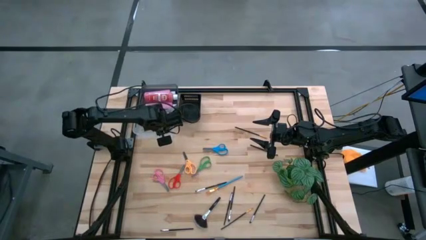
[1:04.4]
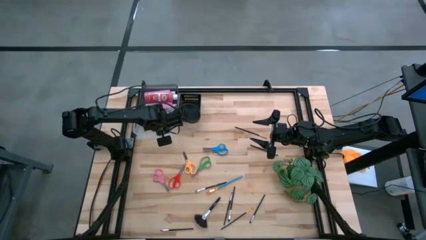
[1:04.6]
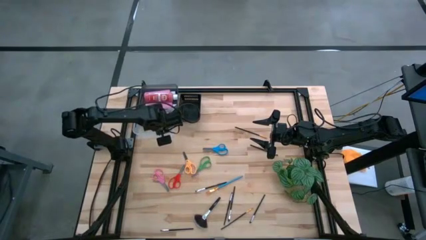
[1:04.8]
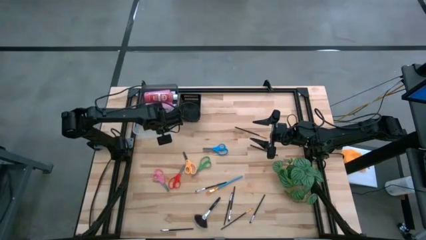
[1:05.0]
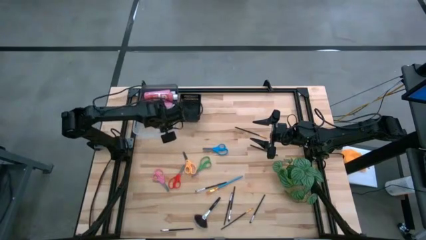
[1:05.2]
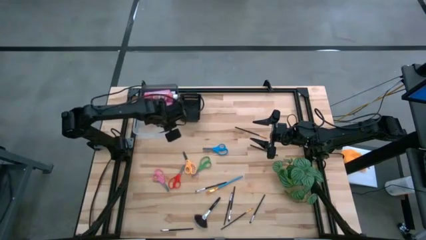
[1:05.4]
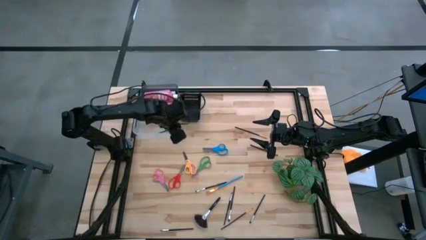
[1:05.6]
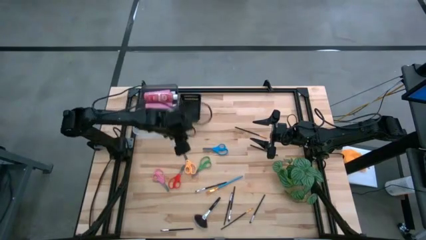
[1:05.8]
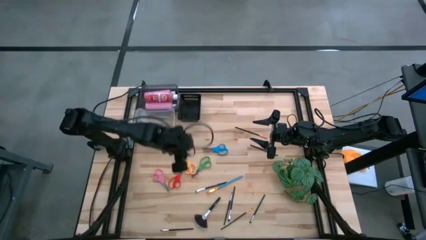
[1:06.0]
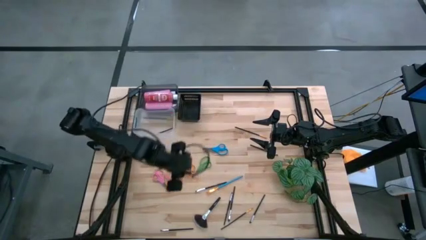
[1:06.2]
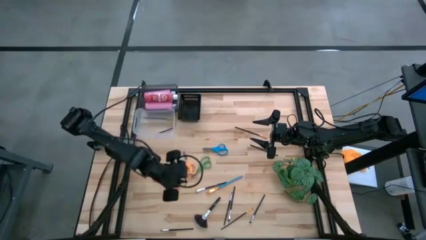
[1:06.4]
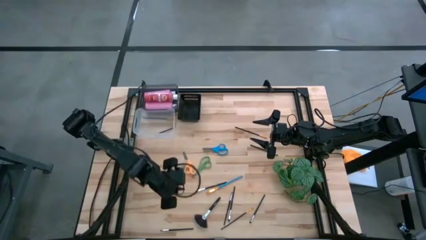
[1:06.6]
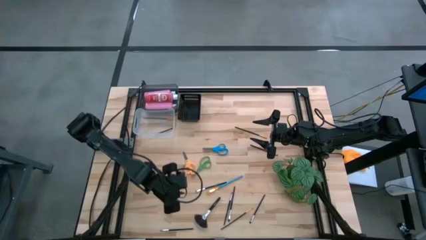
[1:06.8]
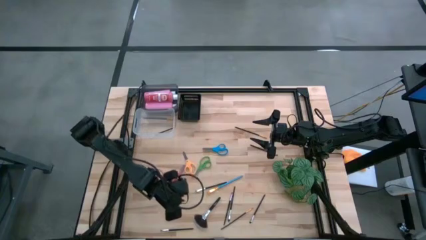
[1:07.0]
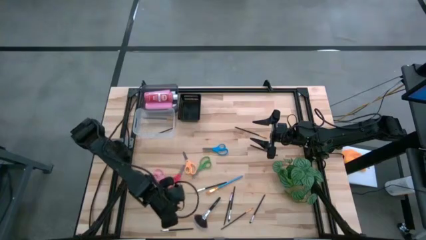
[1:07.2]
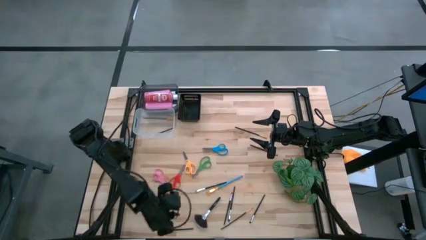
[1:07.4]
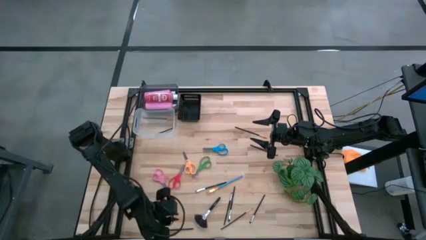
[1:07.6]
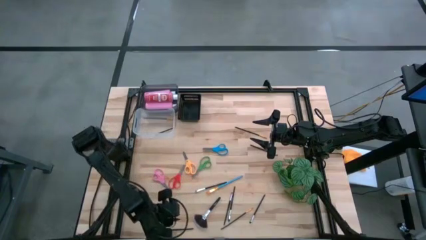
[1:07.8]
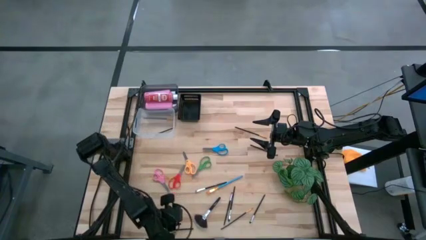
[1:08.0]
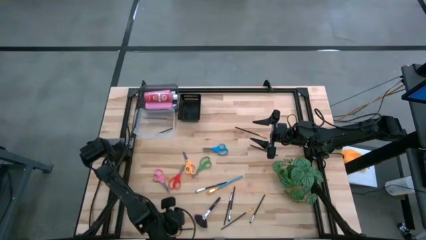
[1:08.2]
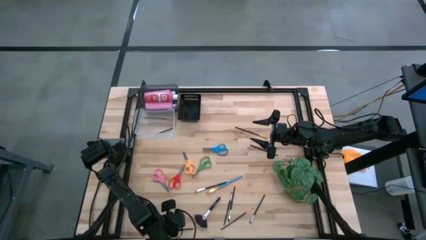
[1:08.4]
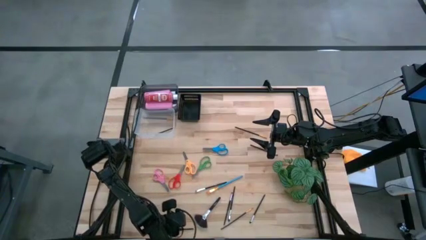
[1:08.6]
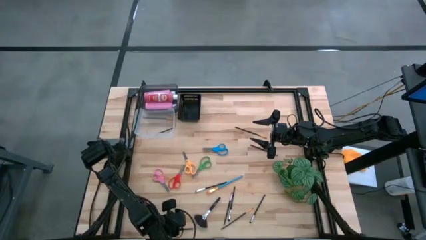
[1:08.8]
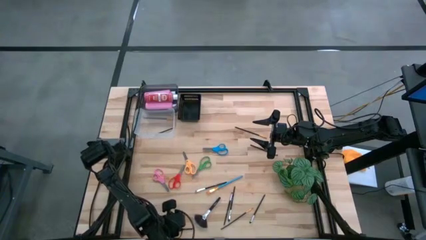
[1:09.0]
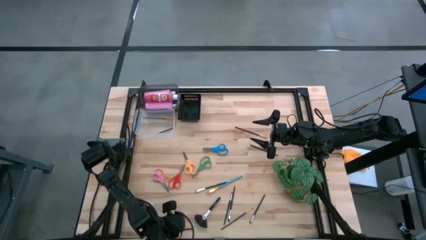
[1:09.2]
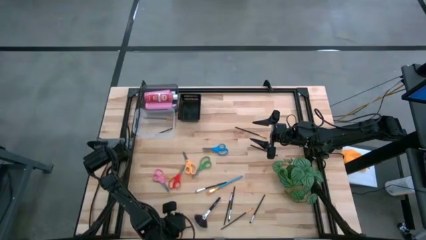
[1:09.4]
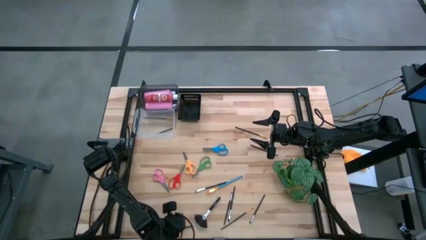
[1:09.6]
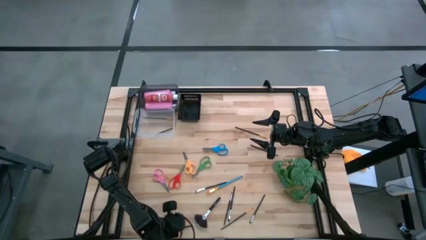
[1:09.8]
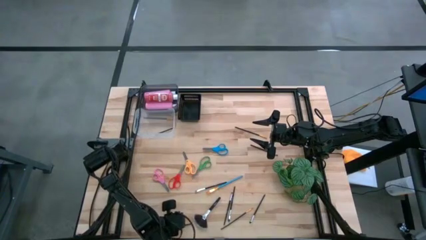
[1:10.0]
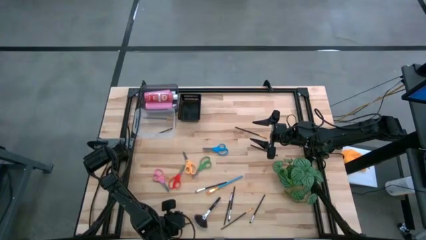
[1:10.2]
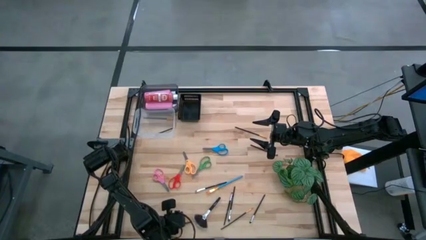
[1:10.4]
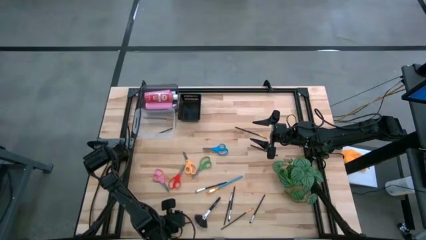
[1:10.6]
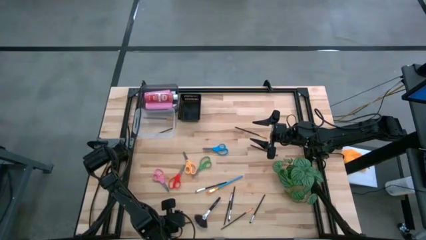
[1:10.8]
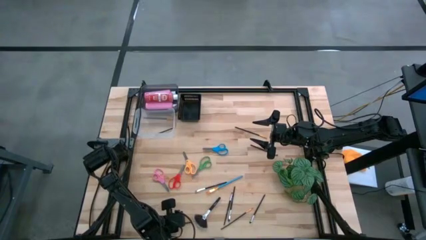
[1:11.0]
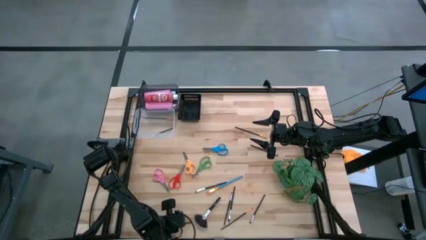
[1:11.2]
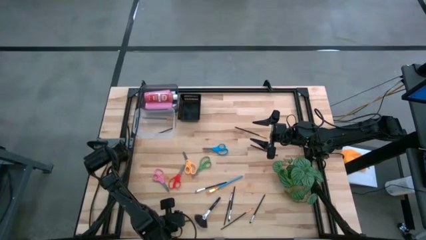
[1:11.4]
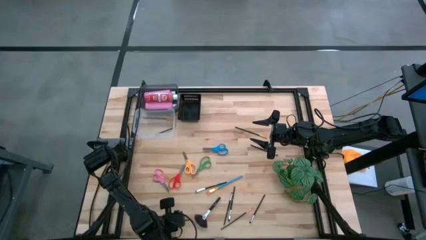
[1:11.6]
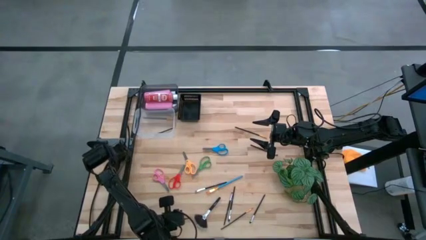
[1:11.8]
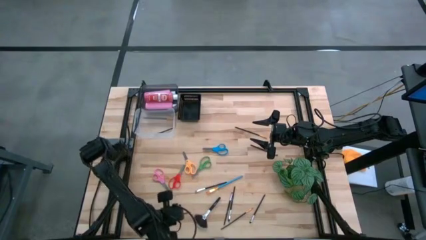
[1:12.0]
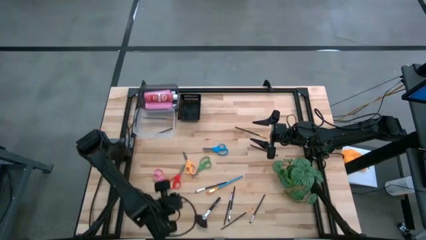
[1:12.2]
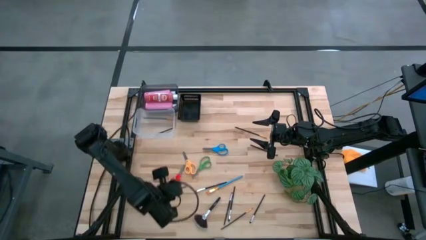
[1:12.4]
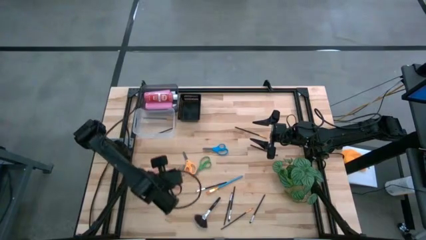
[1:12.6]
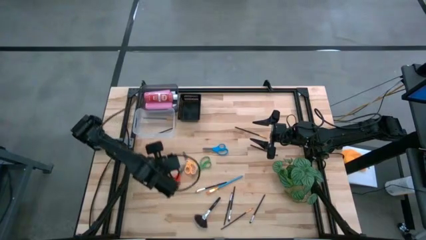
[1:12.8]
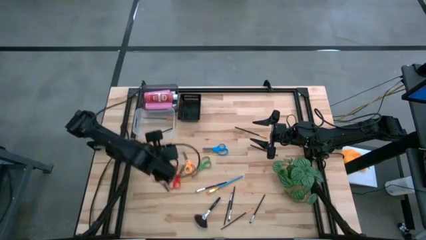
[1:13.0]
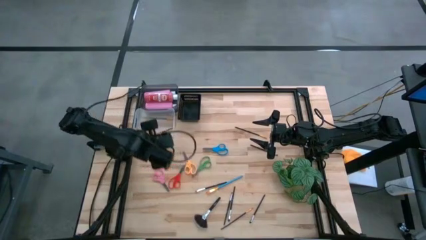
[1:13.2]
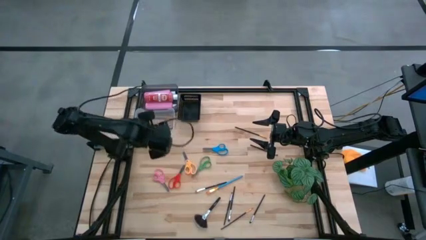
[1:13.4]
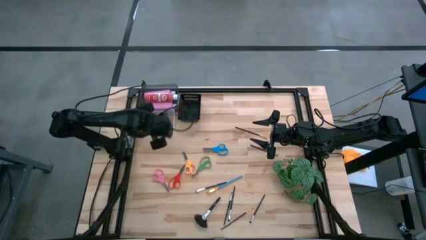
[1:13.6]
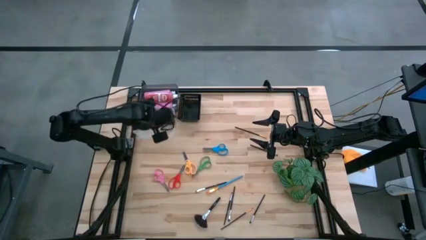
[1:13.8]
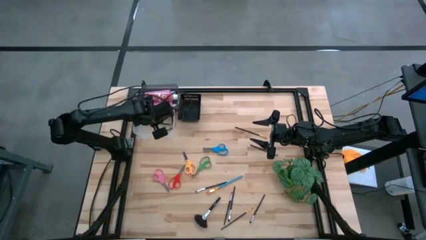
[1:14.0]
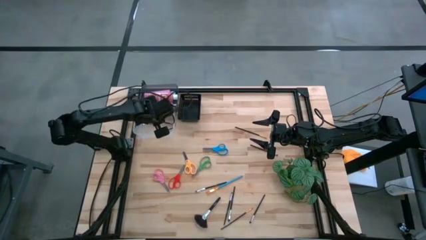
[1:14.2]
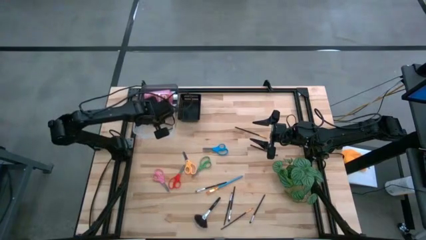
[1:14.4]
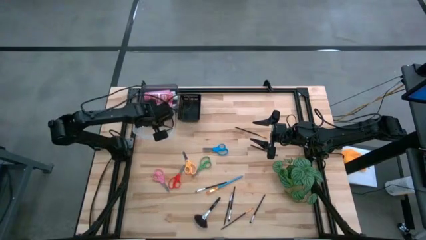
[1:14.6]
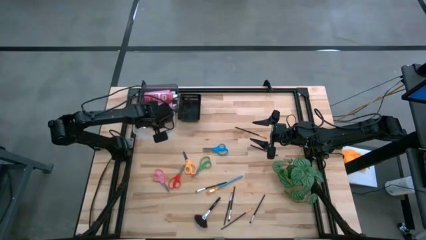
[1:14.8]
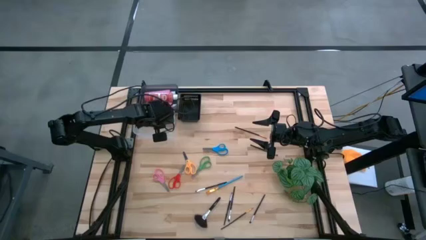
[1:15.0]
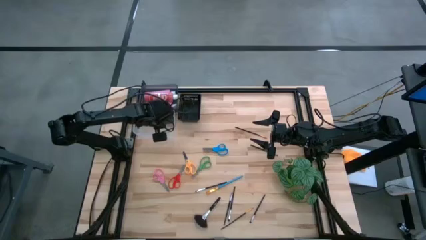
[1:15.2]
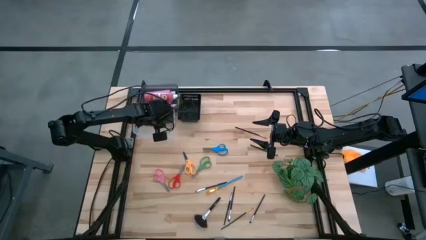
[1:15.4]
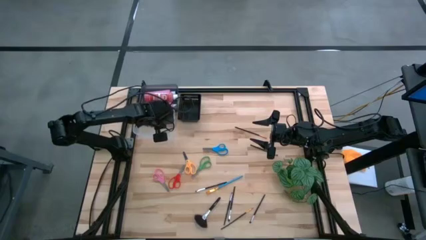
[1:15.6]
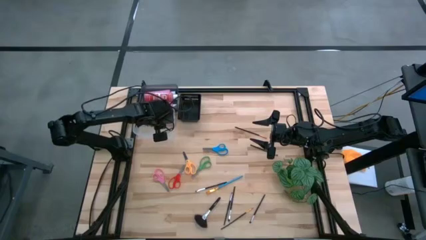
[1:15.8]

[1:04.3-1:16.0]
Task: Pick & Place Paint Supplies
Put the black paint brush into the transparent bin

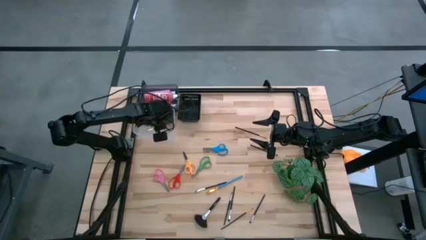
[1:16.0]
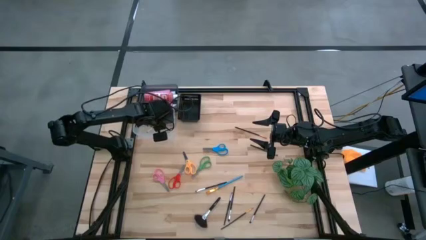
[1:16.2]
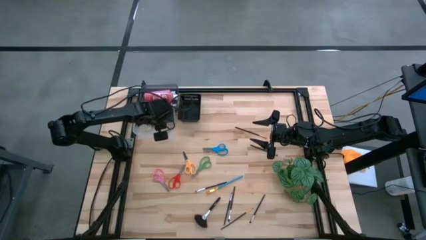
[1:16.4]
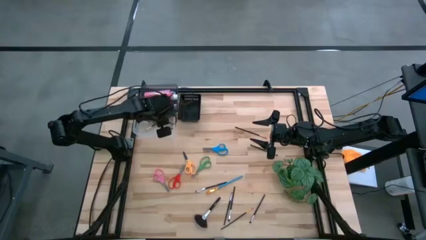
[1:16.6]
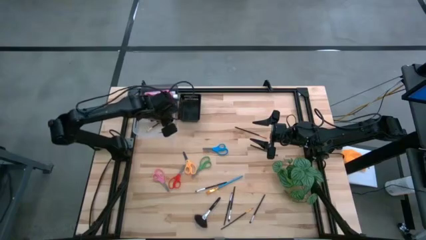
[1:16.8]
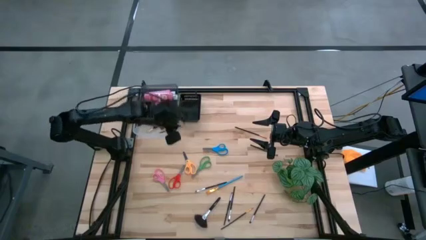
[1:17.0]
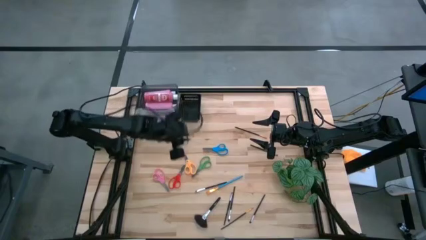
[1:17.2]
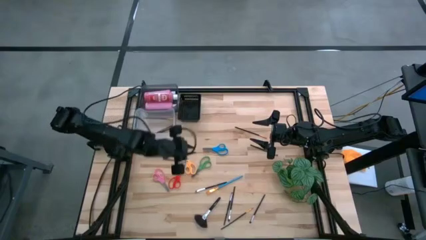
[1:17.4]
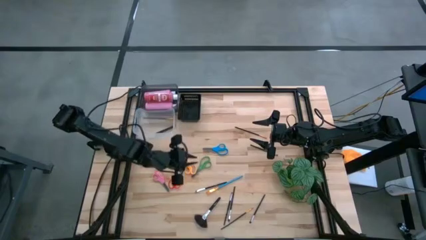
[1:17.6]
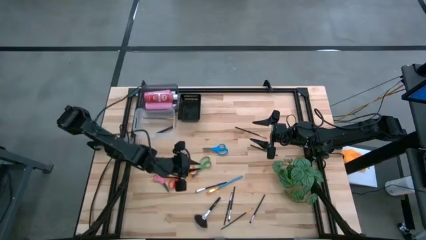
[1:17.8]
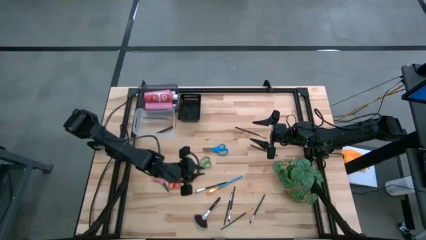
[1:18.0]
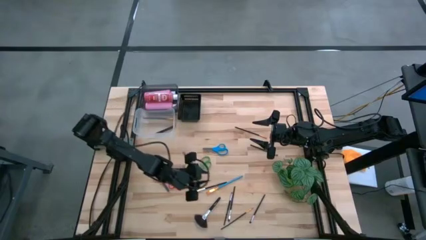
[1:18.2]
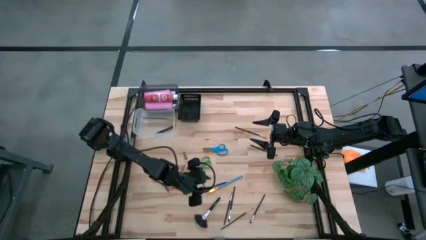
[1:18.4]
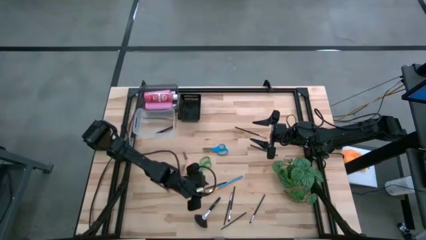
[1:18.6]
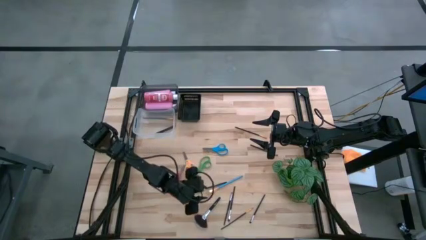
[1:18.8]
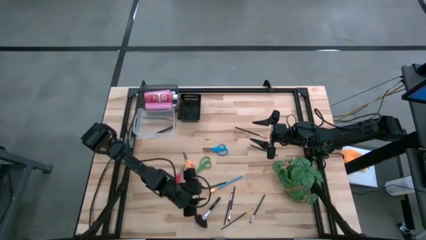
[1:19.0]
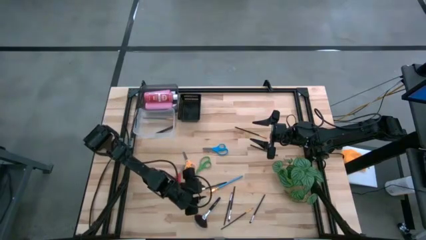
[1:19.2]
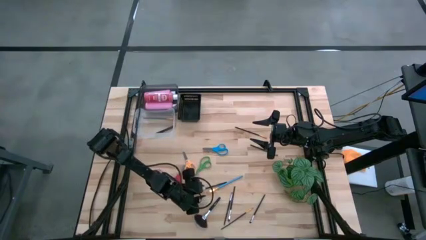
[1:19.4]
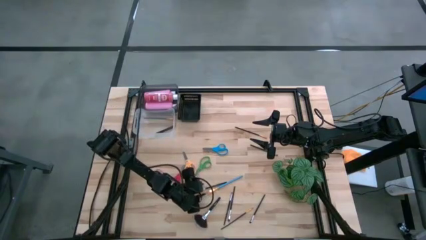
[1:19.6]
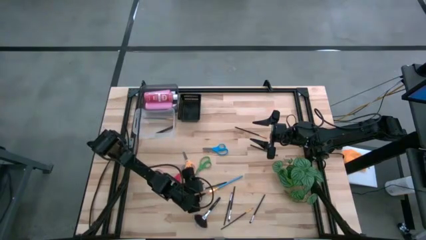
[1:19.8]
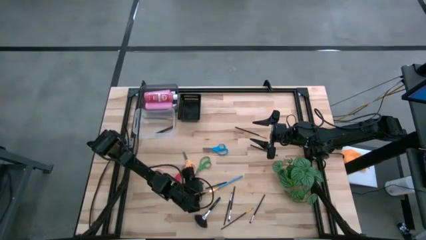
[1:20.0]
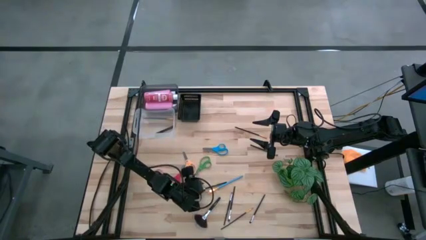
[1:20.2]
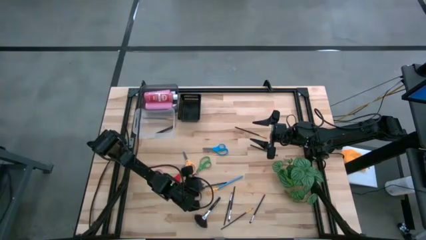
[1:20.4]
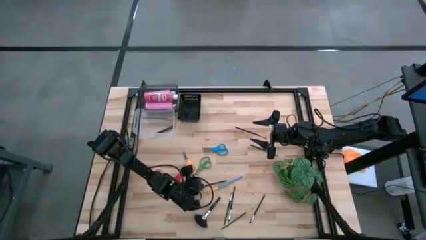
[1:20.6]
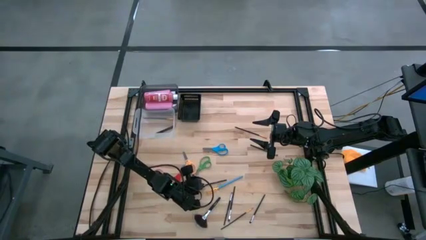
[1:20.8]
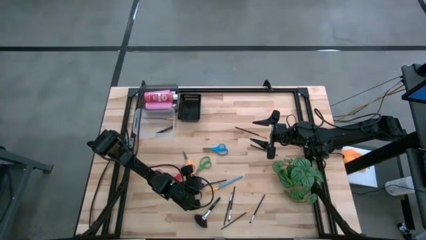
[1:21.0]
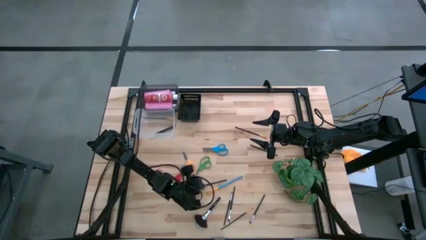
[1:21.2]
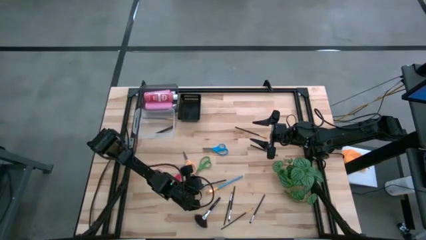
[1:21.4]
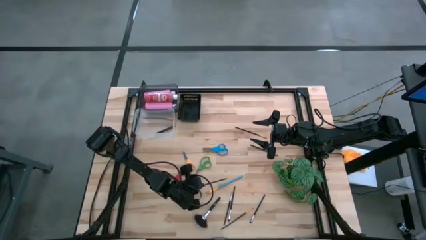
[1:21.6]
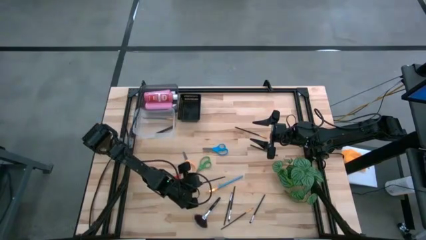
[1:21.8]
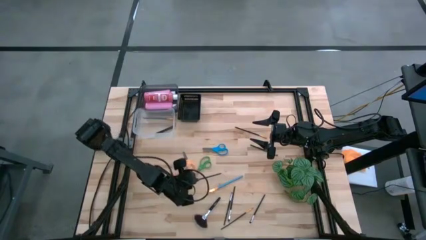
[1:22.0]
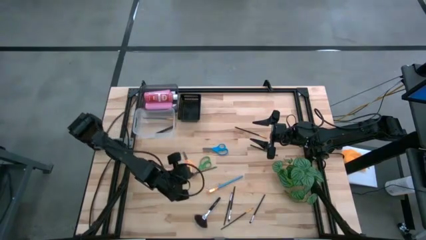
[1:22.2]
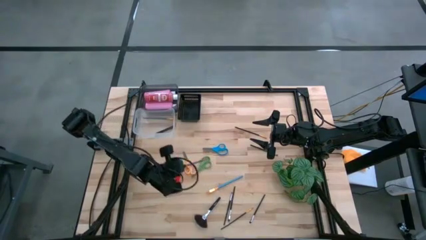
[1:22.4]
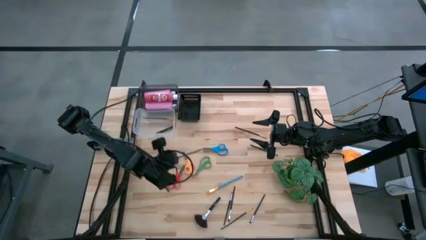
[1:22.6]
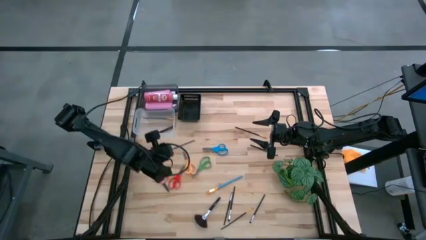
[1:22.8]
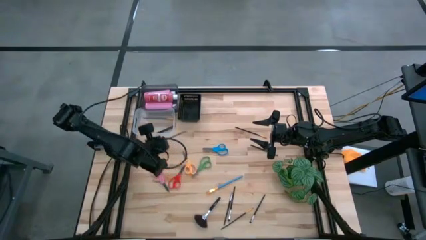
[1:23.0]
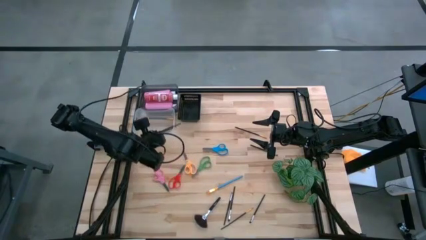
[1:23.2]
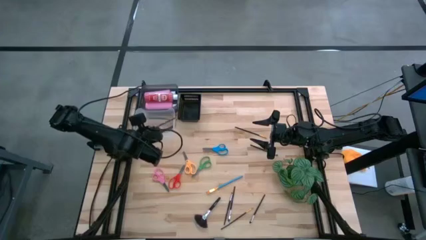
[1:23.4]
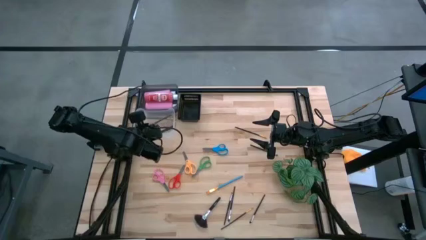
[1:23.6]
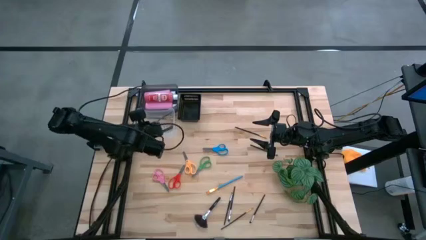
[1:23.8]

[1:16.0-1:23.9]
Put the black paint brush into the transparent bin
